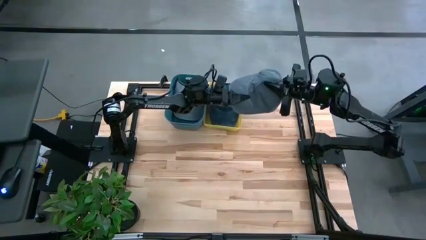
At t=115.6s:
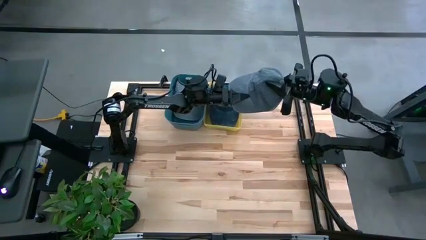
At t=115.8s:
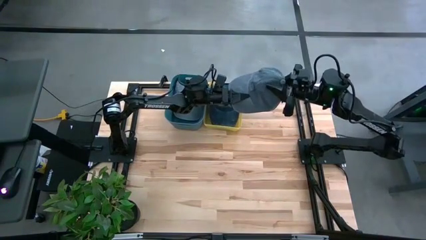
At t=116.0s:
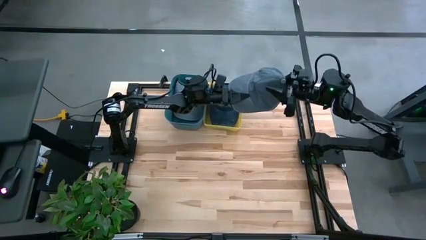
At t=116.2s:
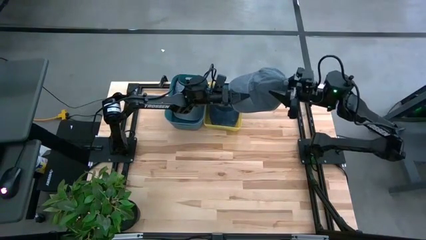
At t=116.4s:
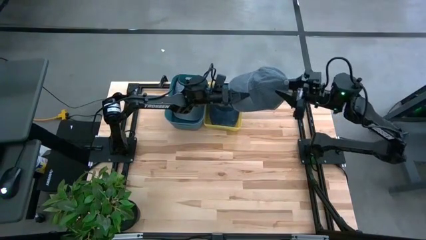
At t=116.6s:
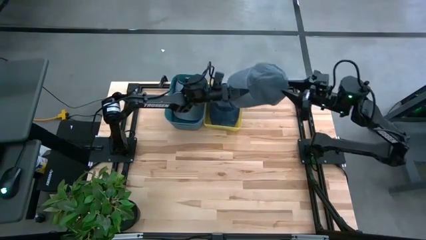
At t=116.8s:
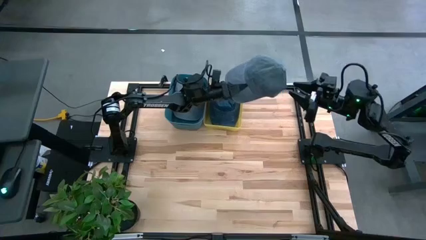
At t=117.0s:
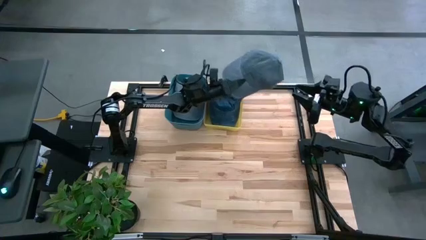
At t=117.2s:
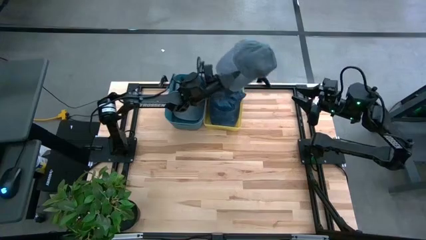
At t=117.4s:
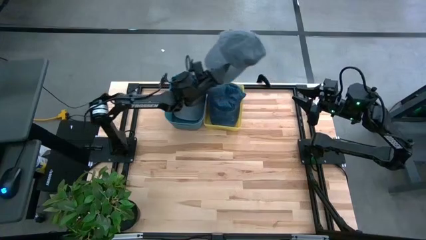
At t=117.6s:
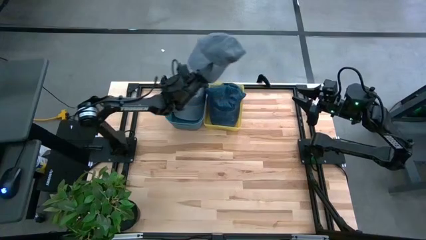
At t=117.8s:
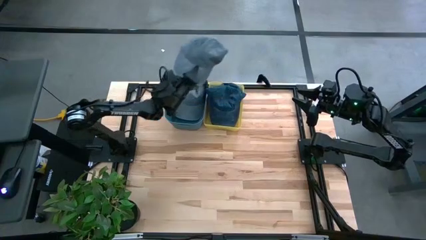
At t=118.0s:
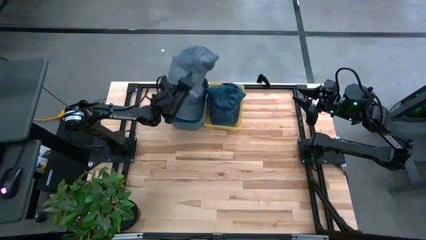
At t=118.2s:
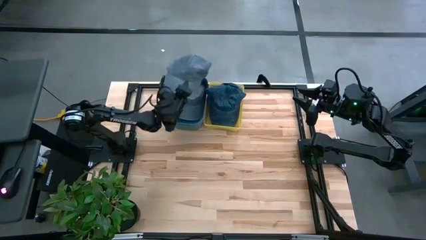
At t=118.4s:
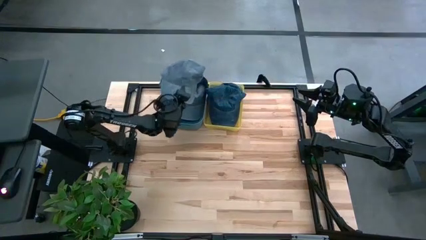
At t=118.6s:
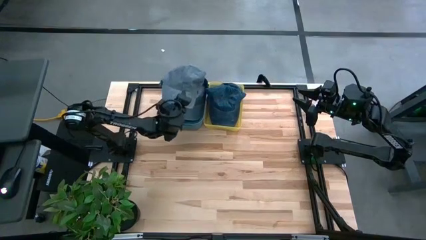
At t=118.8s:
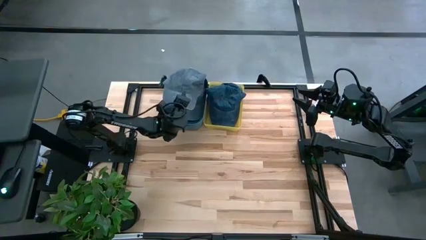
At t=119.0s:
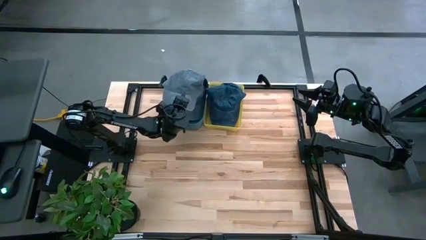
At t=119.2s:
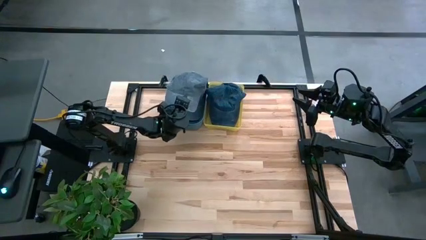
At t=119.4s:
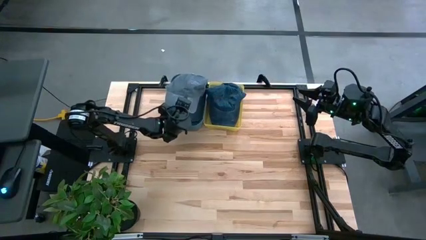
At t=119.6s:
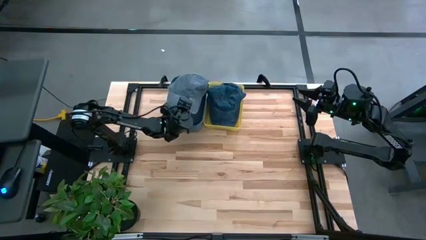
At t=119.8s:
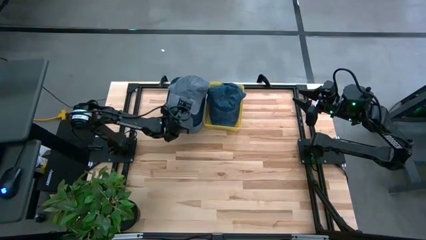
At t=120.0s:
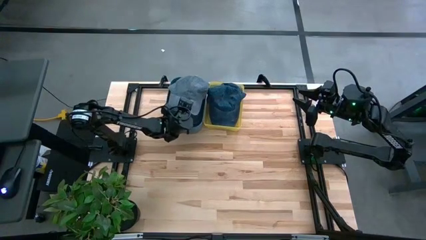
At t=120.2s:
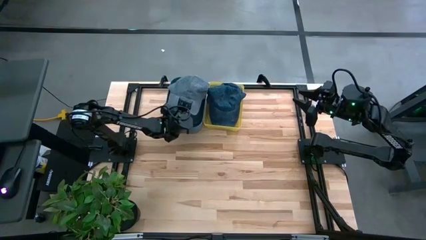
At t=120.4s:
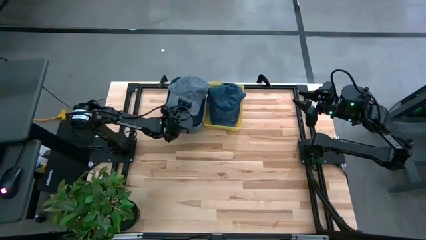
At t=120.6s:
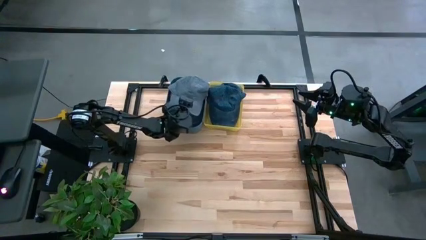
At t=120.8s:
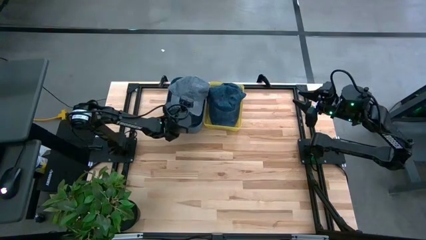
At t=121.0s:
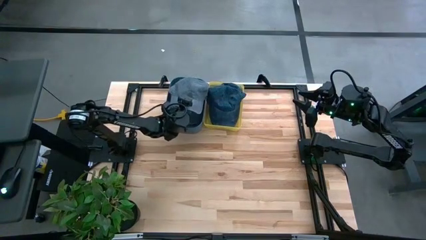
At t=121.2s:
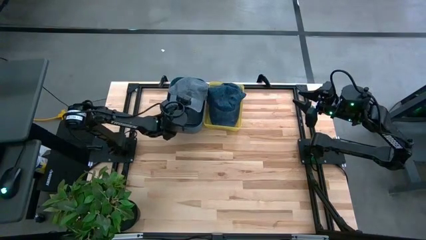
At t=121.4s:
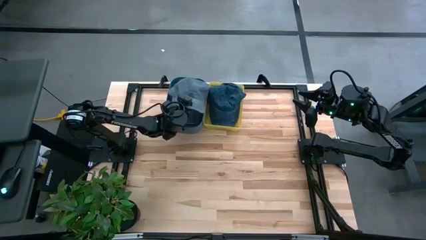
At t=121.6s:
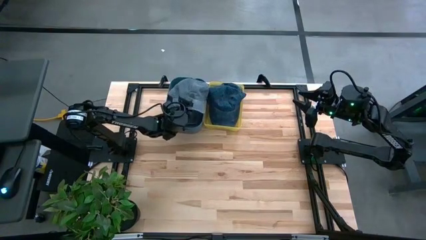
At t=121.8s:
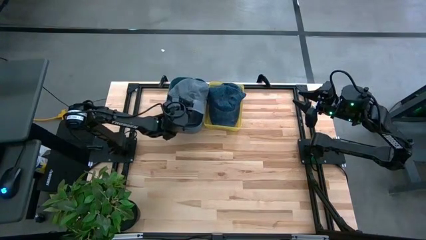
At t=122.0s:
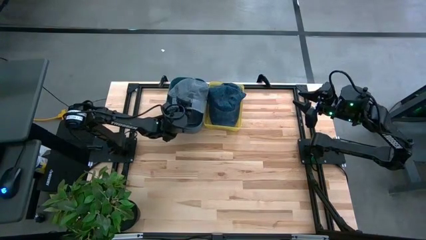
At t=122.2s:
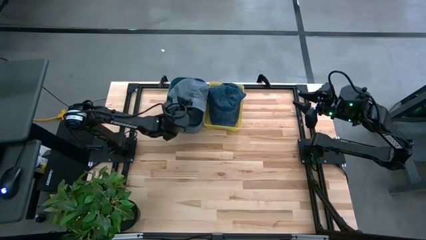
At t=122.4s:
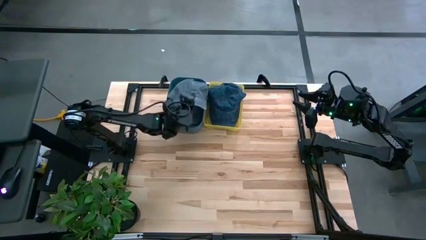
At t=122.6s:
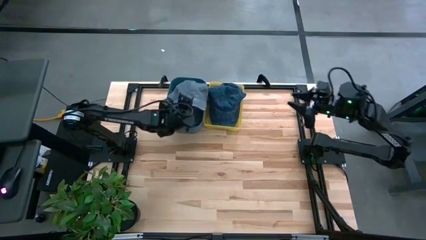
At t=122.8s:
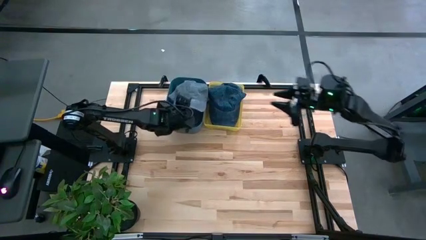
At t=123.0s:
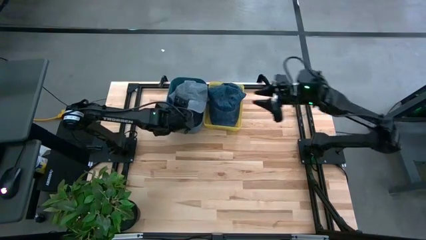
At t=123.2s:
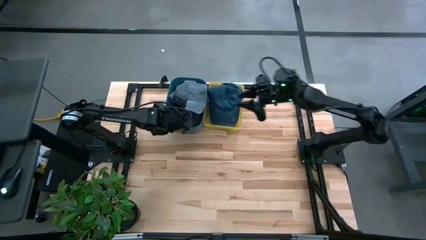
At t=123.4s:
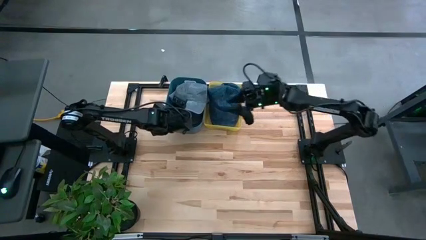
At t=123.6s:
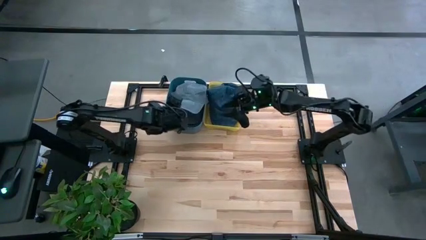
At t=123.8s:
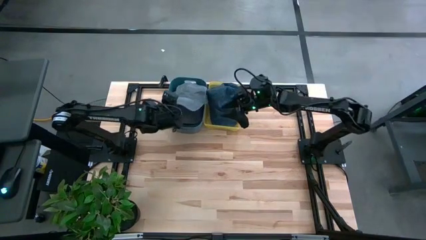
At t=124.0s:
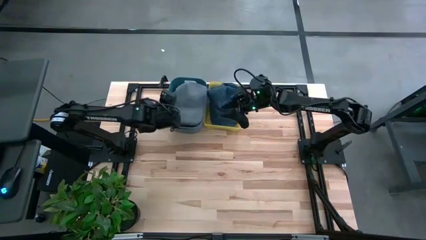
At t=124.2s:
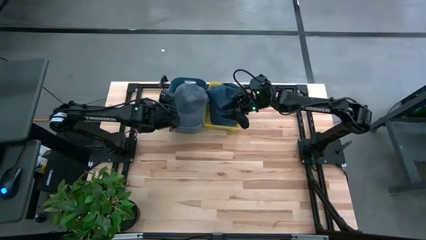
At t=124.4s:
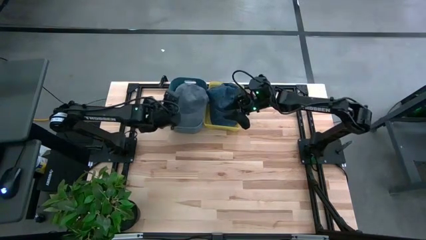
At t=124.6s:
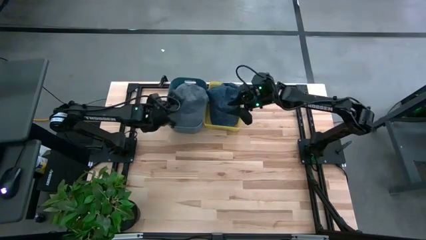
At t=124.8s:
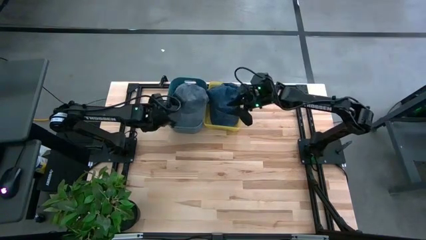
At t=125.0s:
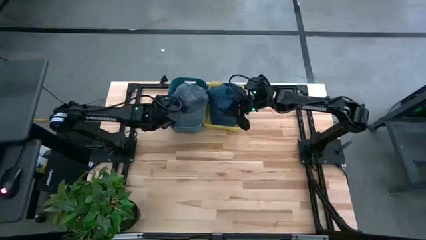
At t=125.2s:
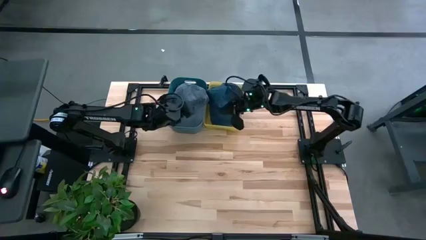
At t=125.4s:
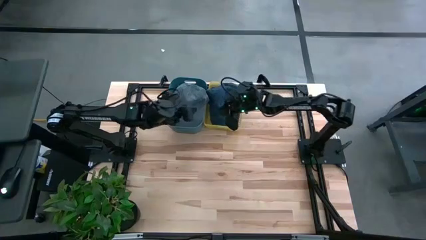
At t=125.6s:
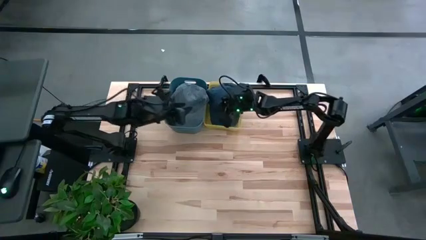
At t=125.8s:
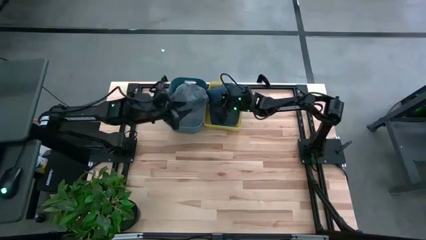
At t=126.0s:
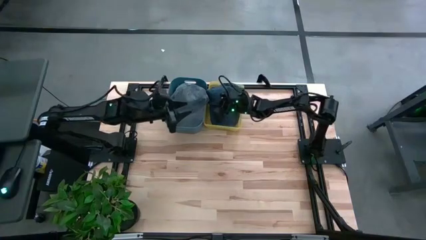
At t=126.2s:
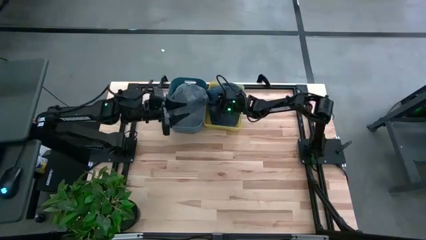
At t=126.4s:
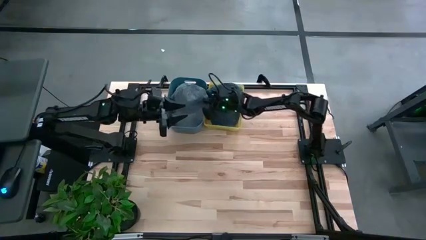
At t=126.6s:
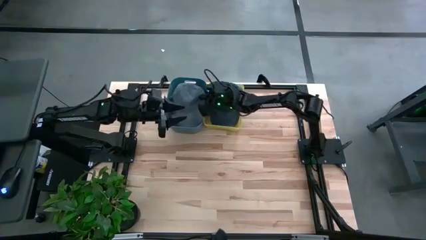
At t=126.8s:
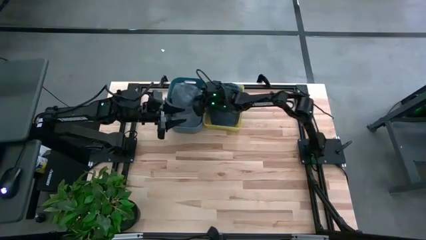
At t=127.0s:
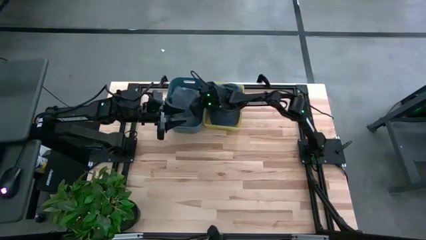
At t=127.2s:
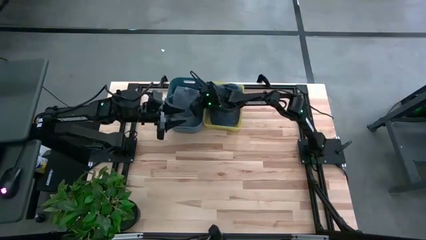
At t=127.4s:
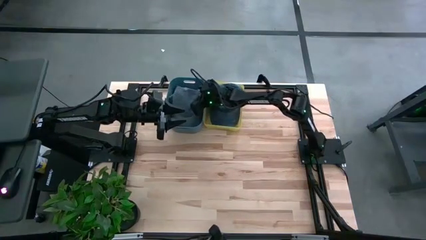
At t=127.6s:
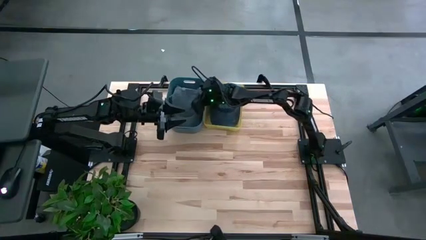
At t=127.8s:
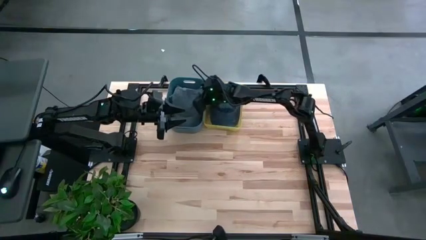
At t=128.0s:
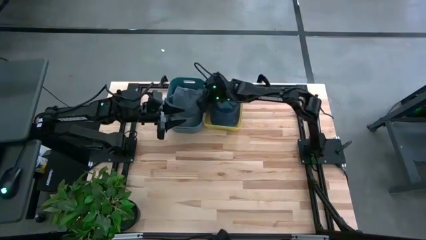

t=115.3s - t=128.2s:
Task: Pick & Place hat
Put the gray cap into the blue bin

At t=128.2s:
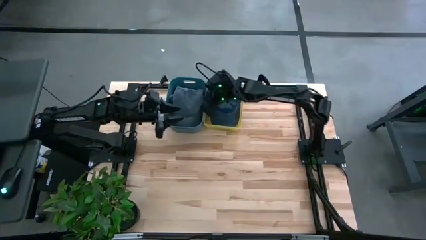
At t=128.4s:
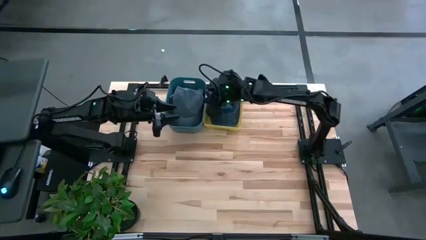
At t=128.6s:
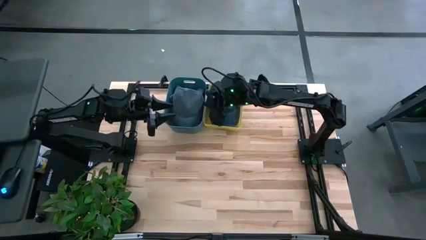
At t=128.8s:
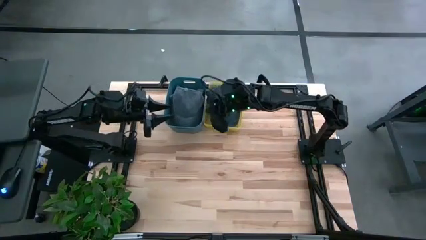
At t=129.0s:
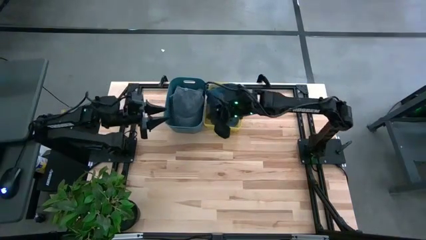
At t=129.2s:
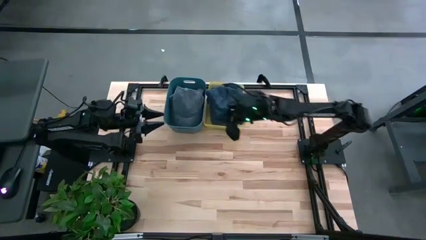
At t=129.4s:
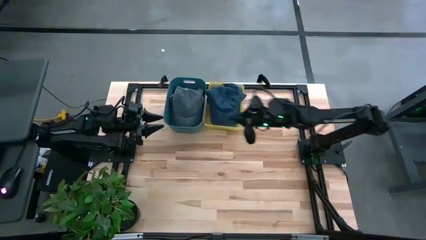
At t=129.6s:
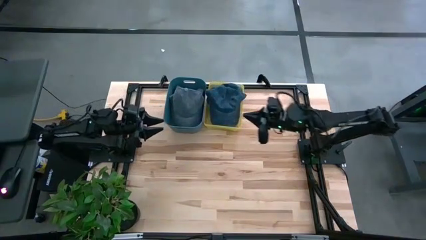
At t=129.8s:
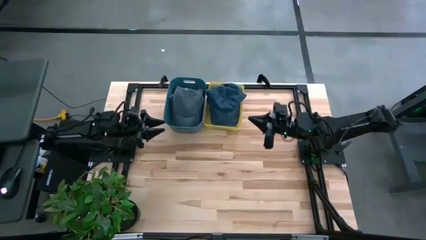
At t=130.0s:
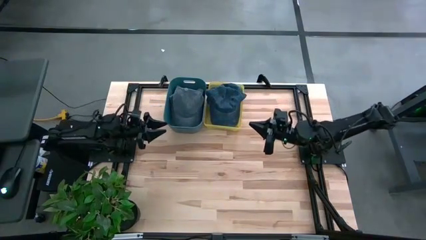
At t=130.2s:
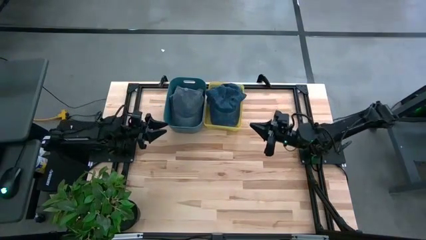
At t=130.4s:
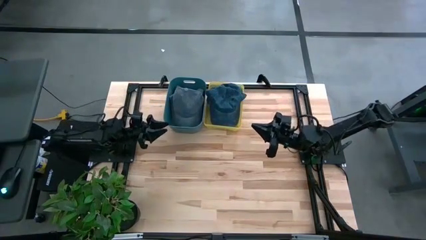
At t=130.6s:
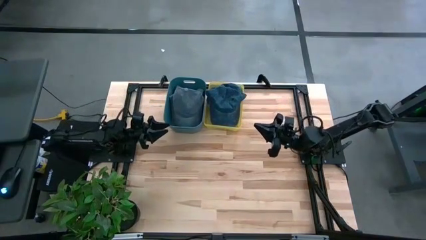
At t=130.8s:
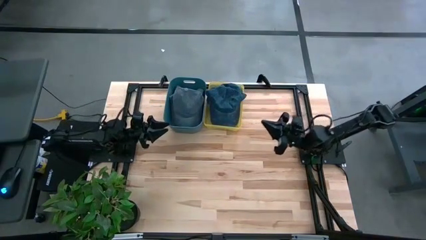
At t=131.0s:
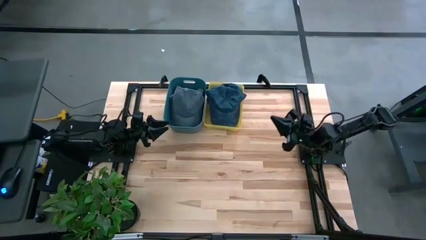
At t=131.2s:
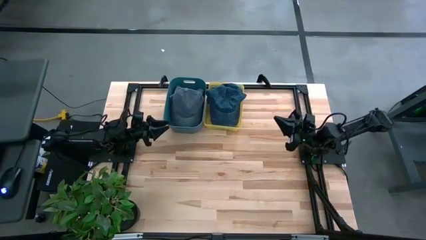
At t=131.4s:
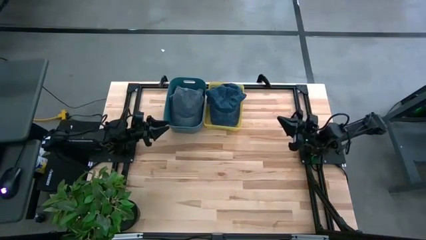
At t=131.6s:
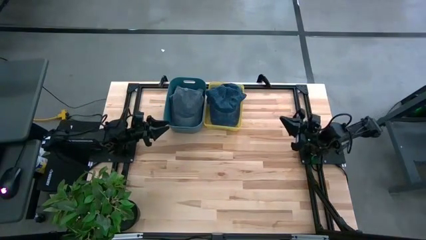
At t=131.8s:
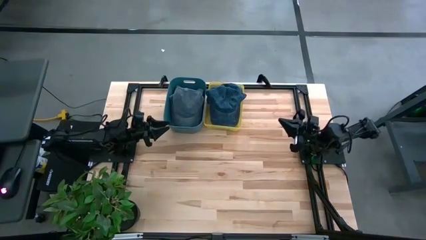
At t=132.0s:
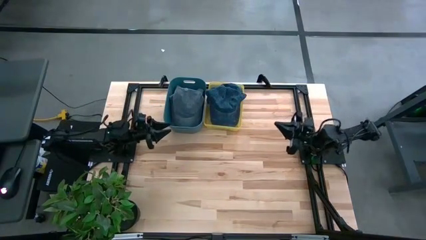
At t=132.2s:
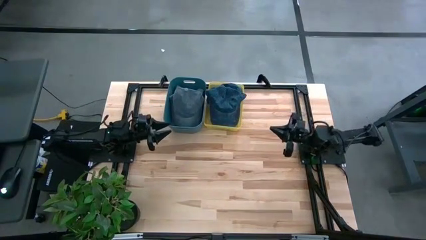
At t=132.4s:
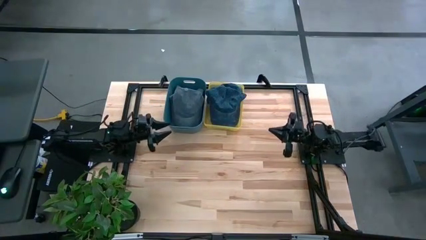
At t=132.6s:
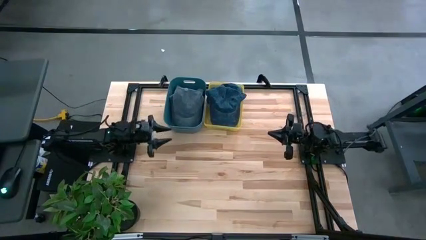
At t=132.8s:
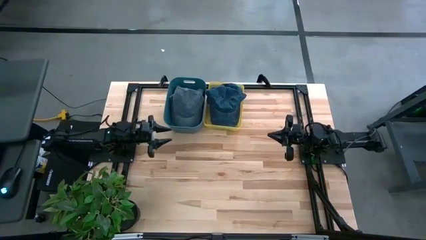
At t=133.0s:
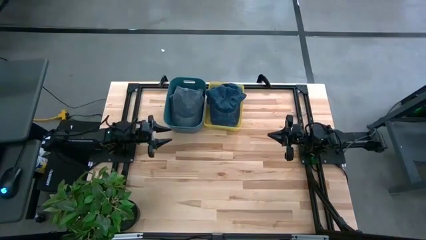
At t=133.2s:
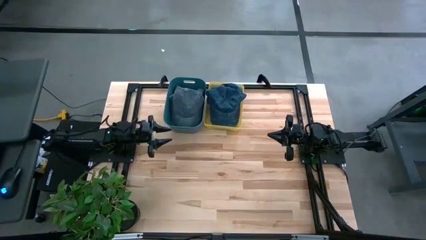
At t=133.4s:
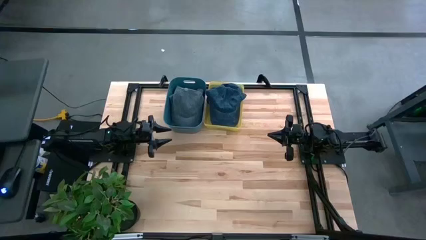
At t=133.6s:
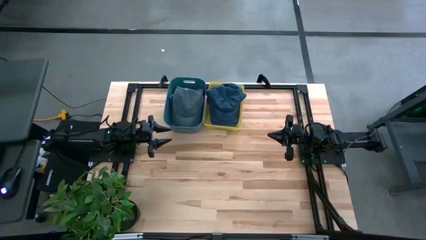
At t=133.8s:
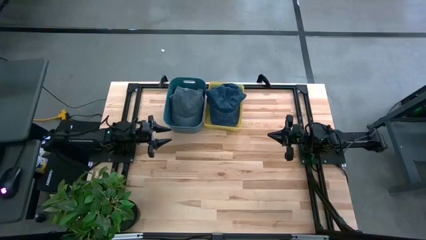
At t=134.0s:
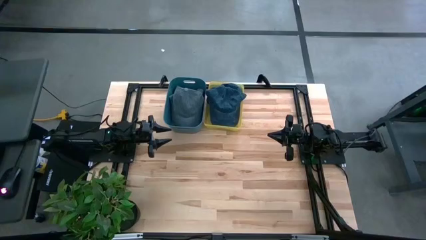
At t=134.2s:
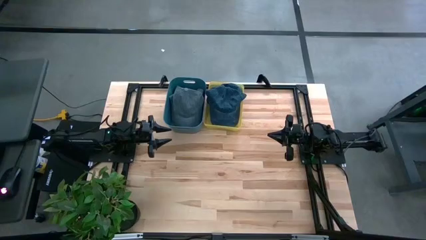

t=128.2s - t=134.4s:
Return to Home Position
